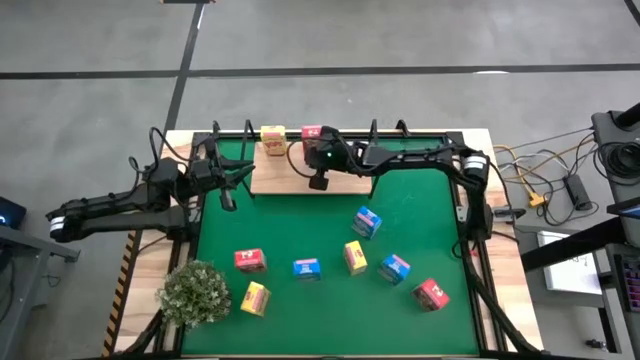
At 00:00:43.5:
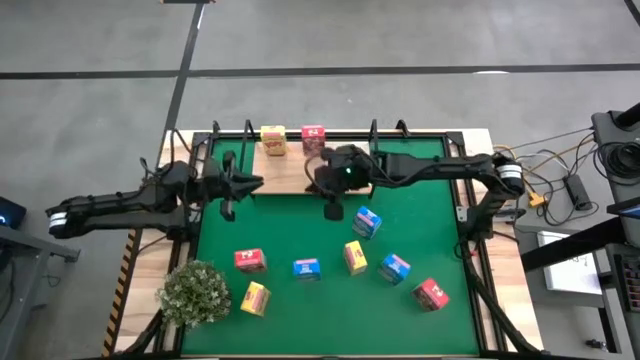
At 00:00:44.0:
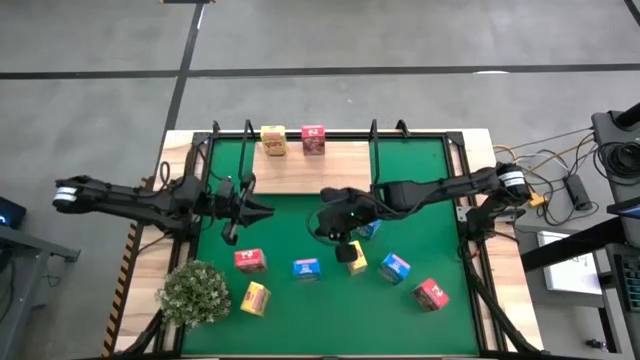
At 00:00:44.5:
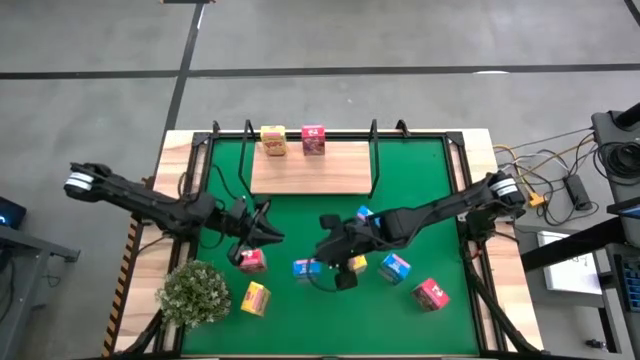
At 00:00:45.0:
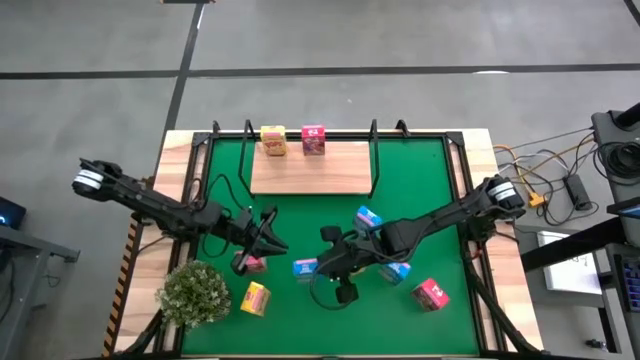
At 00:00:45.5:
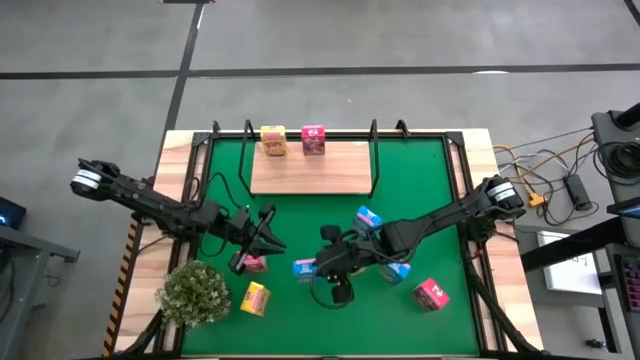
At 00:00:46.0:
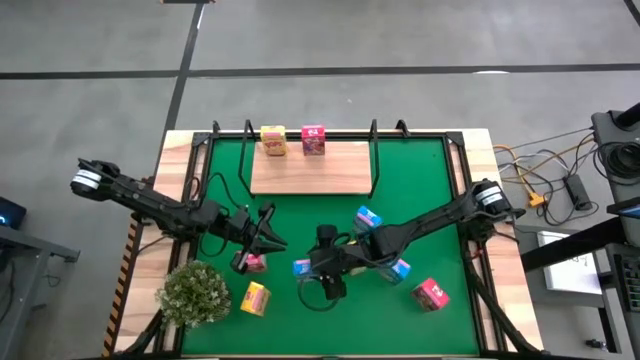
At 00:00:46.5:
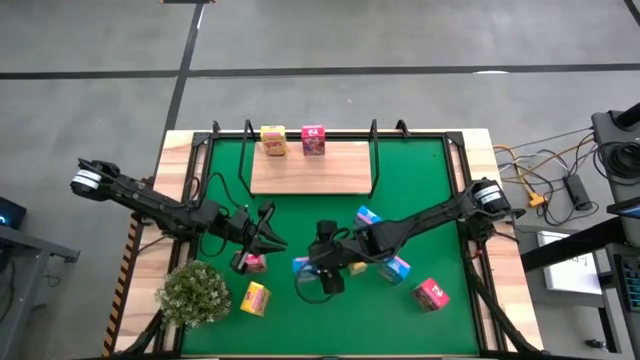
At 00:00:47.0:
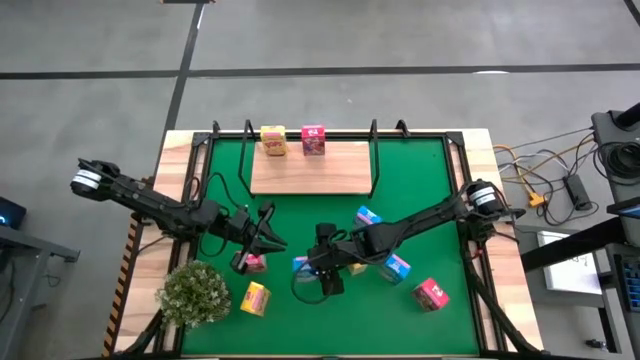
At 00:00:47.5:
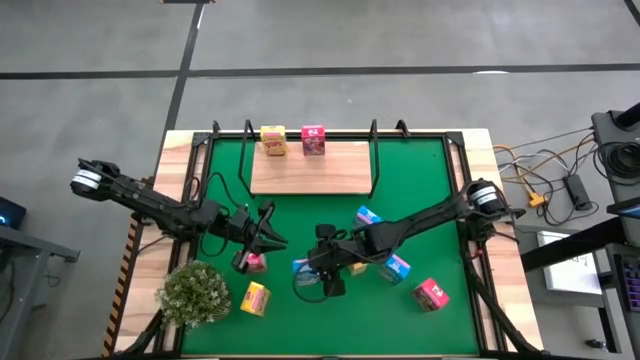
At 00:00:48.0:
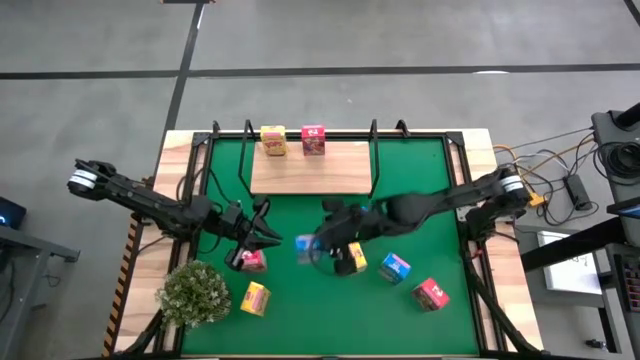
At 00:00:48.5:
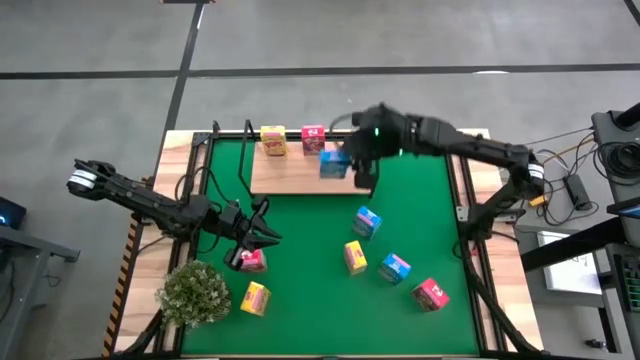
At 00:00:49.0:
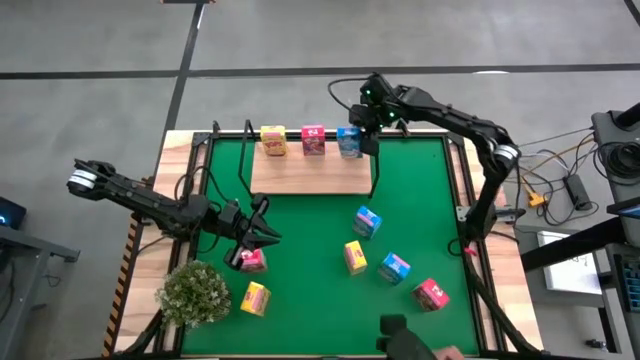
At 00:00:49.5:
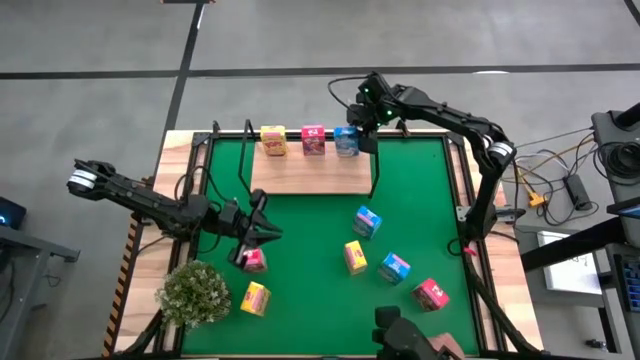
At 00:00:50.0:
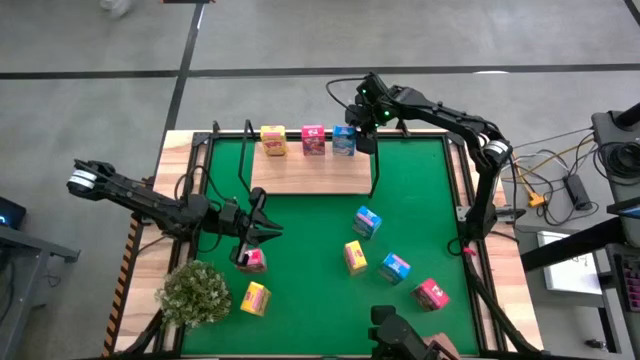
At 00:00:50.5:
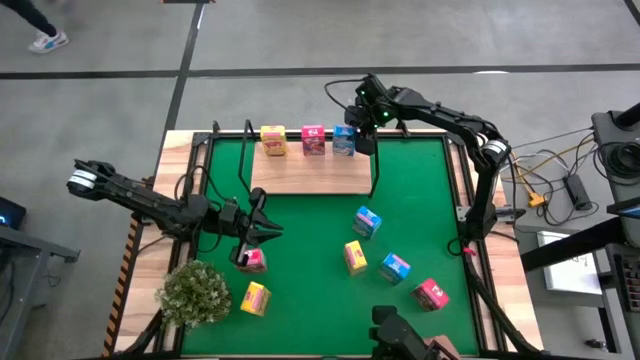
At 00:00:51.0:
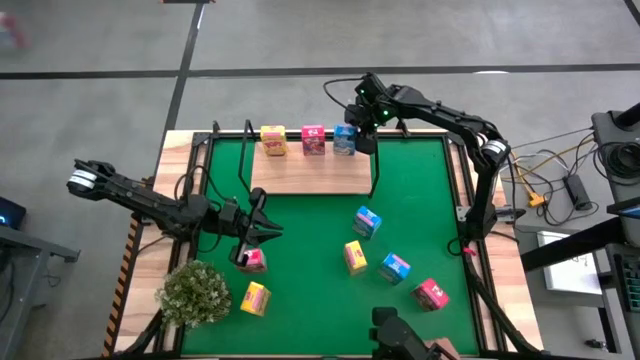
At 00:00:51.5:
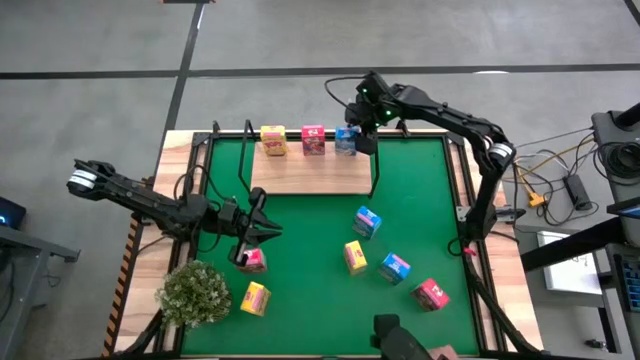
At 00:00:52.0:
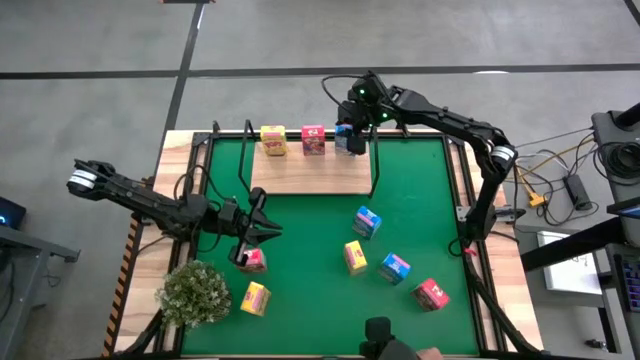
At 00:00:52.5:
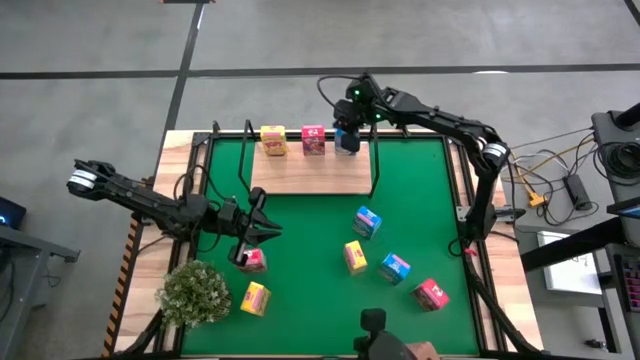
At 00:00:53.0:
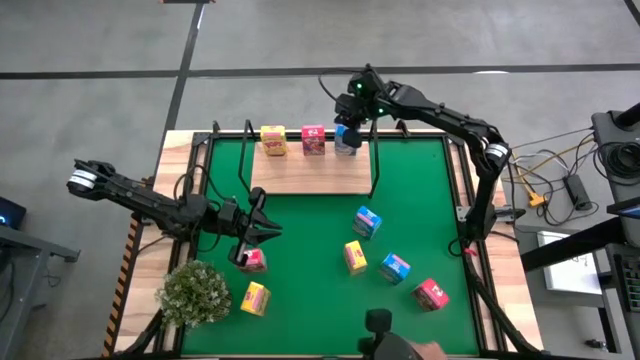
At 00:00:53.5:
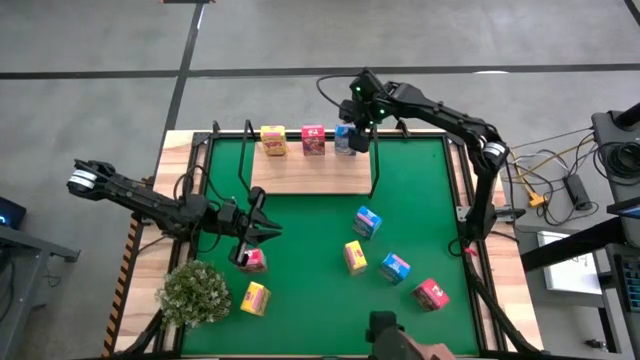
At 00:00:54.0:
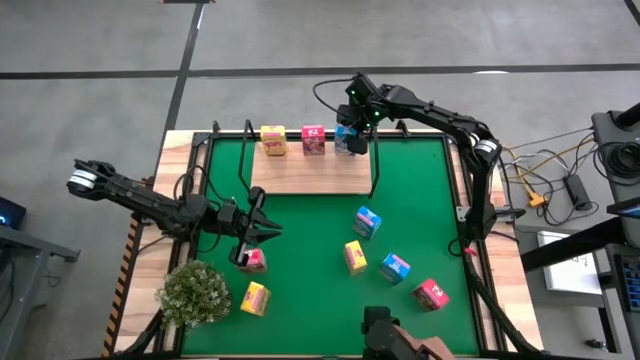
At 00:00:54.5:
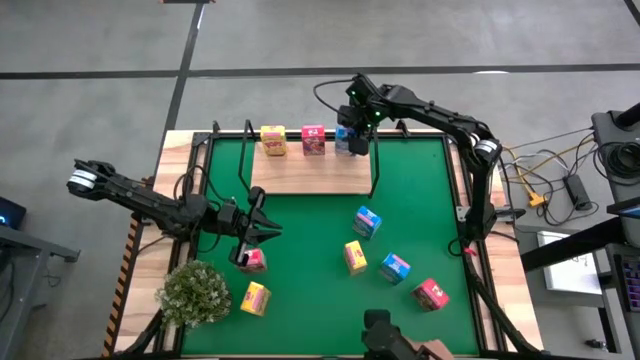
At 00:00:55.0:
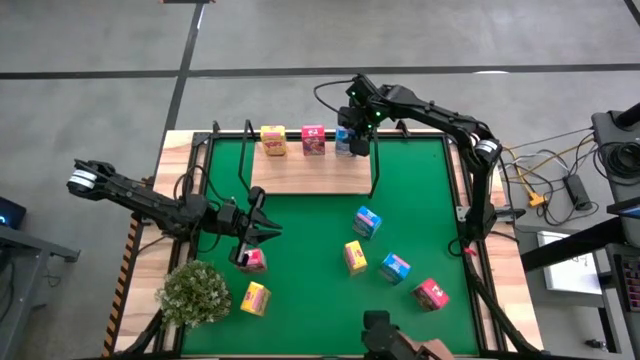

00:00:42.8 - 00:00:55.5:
Task: Stack cereal on shelf
Put the bottom left blue cereal box on the shelf

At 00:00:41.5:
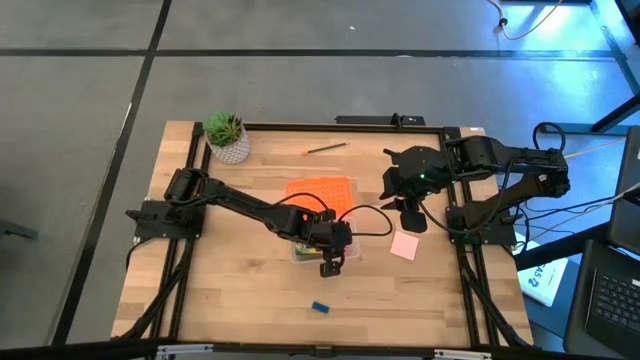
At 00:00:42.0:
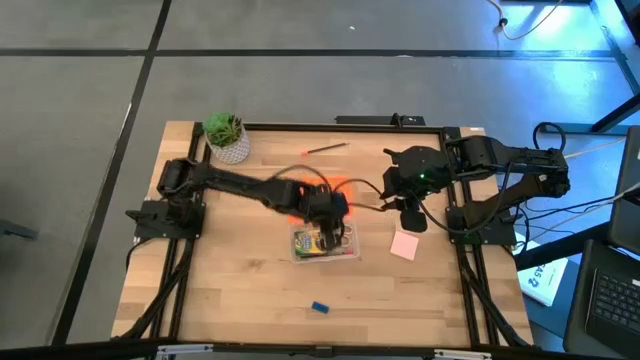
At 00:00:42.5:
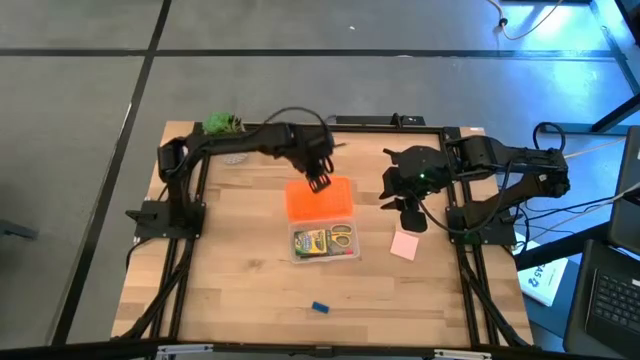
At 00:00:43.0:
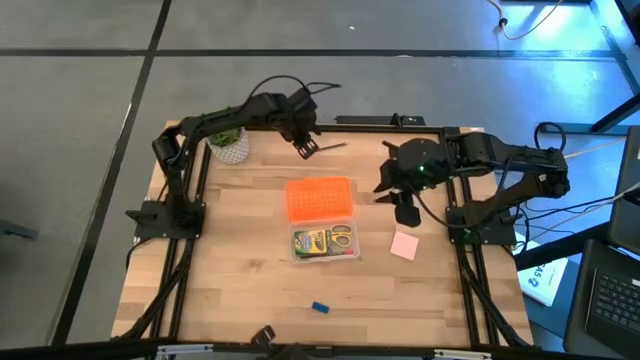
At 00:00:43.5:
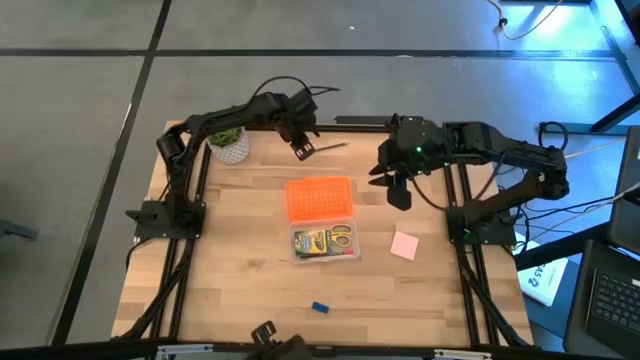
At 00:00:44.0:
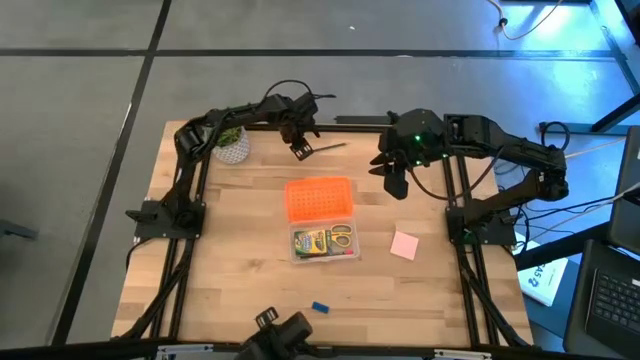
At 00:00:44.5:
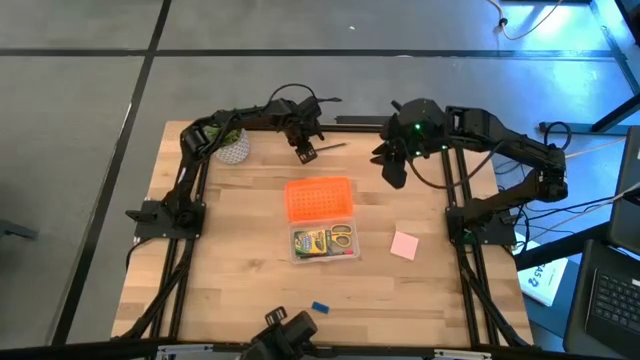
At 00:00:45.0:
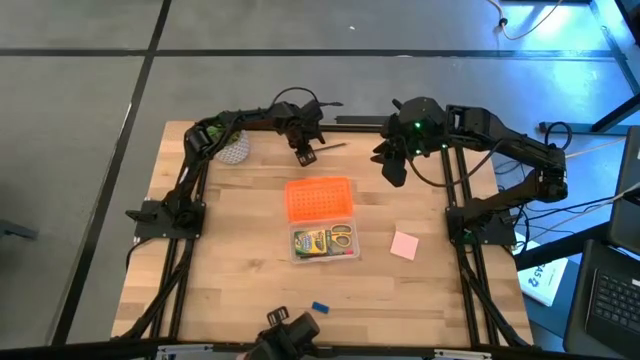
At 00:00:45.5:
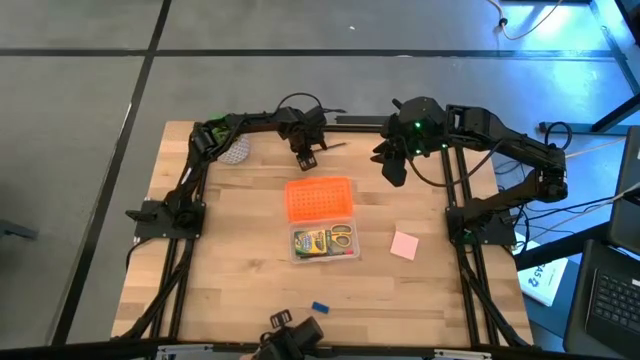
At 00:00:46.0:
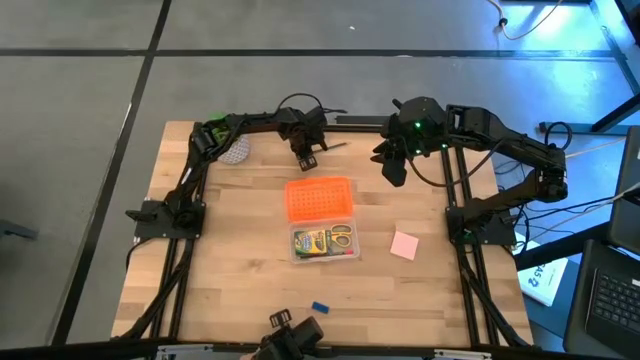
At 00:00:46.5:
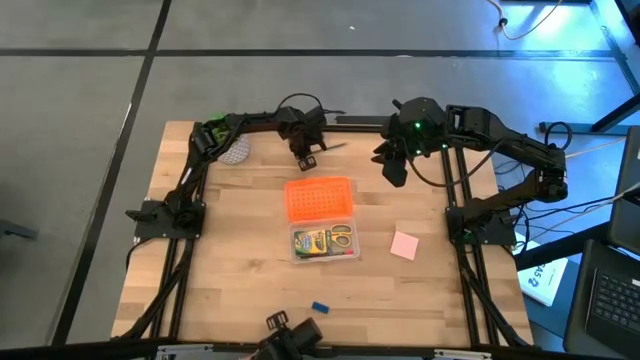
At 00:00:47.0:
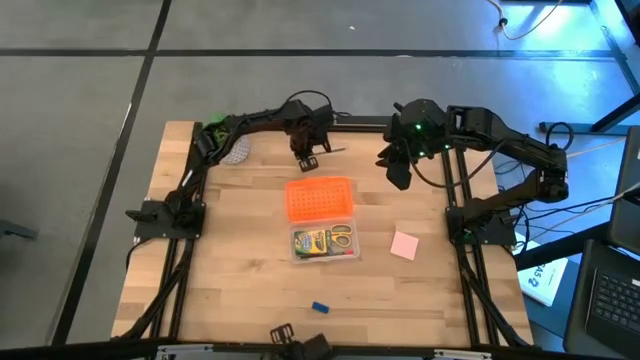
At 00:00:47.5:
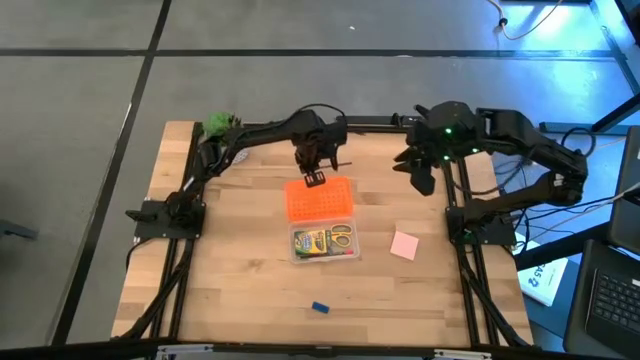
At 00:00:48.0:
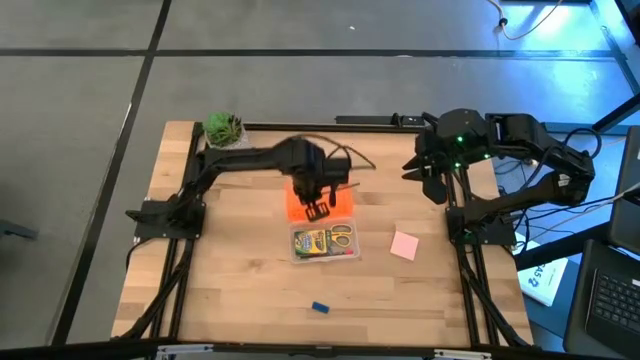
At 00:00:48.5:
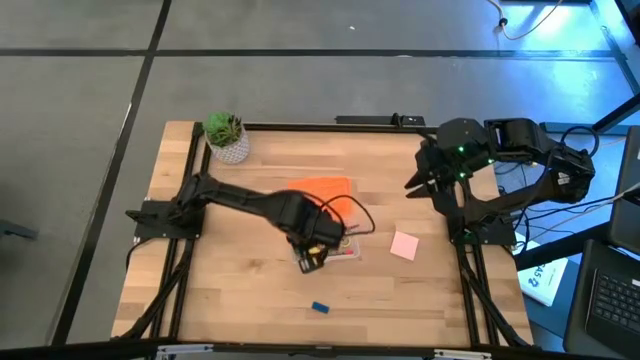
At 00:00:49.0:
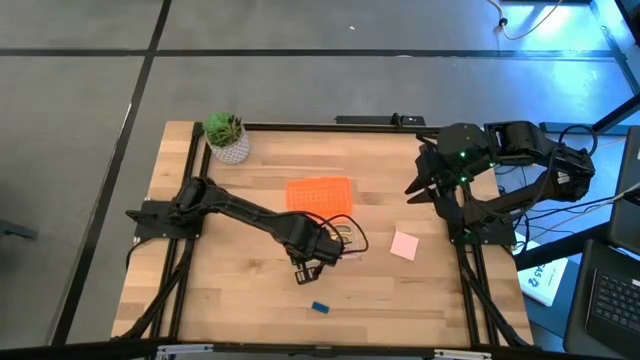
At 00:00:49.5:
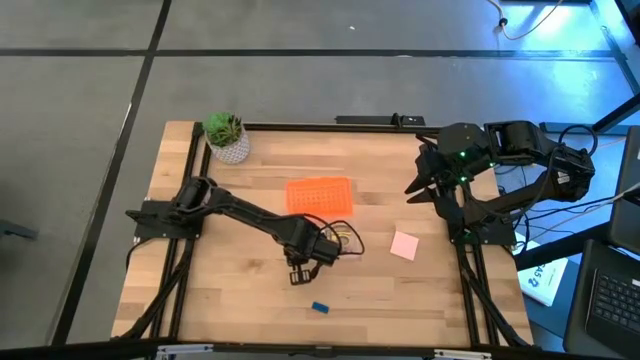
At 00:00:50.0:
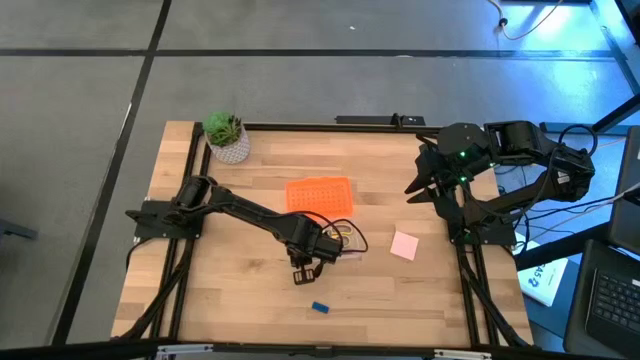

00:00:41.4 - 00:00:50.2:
Task: Pack school essentials
Put the black pencil into the supply box
